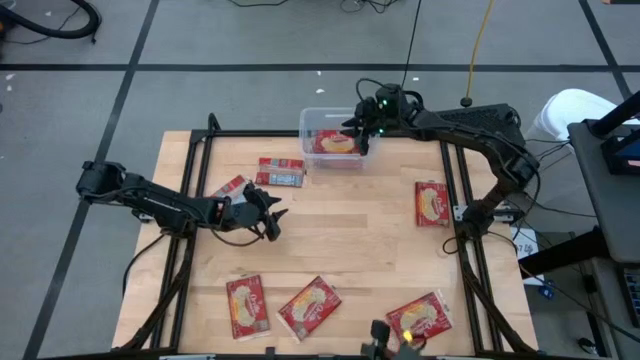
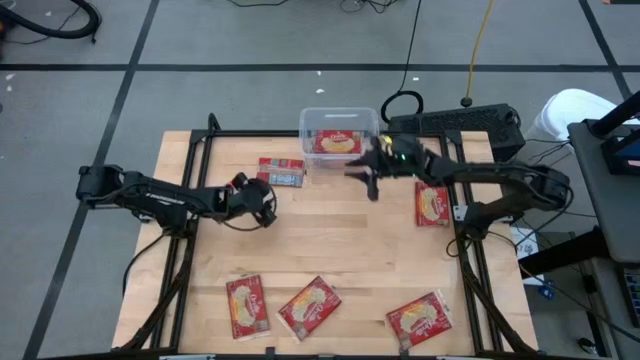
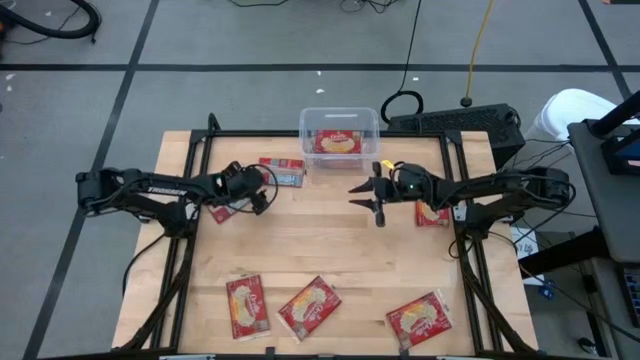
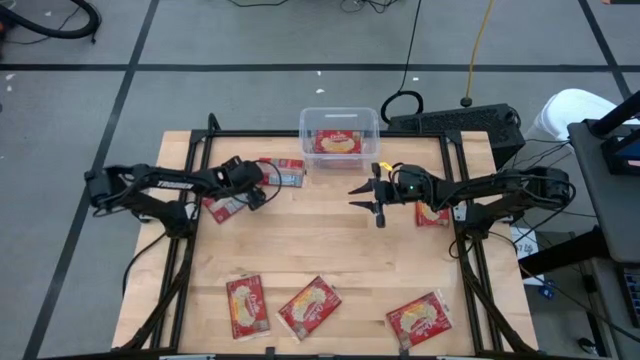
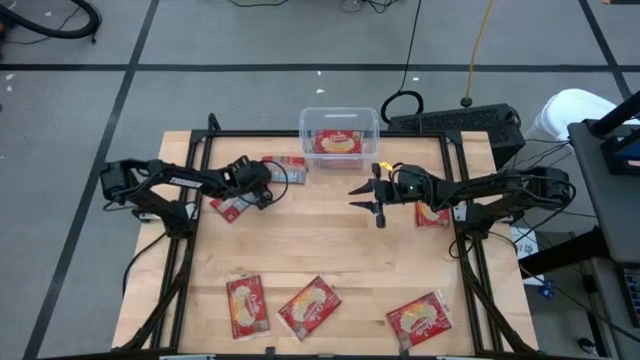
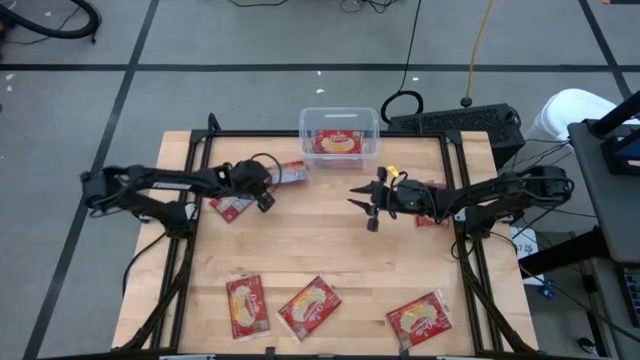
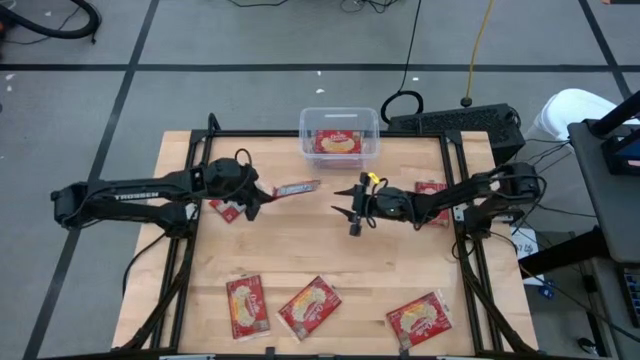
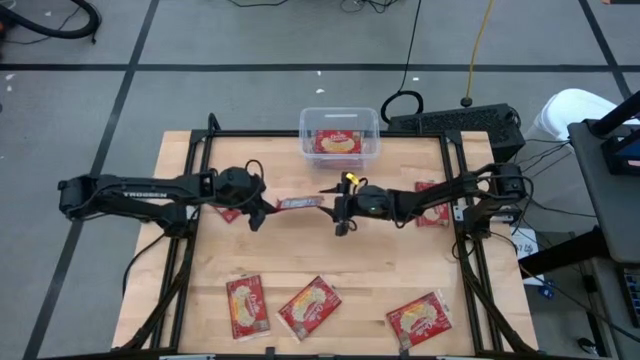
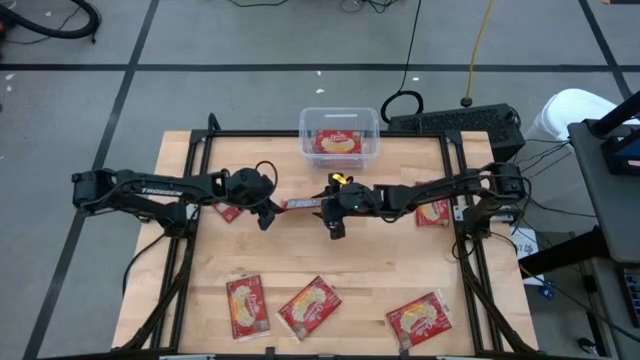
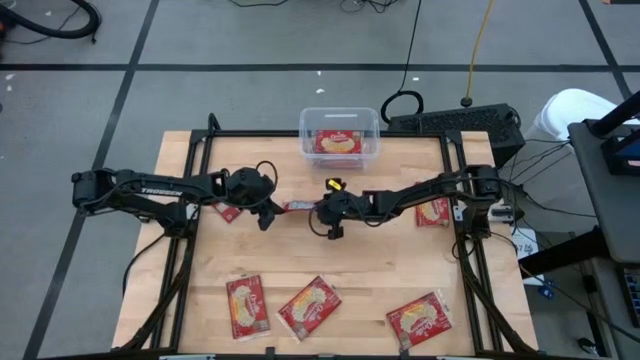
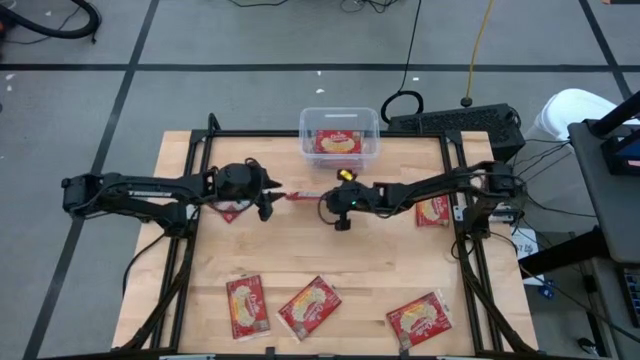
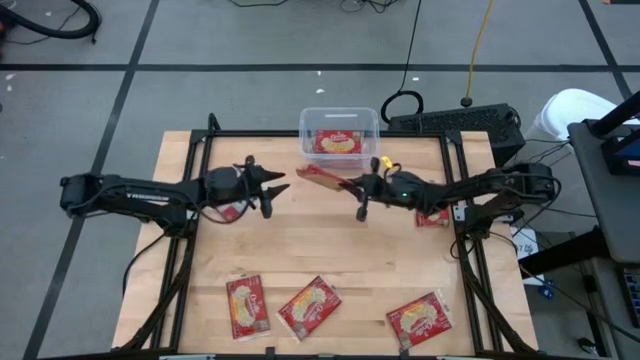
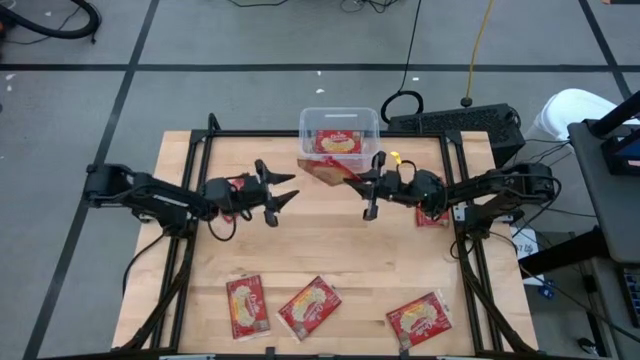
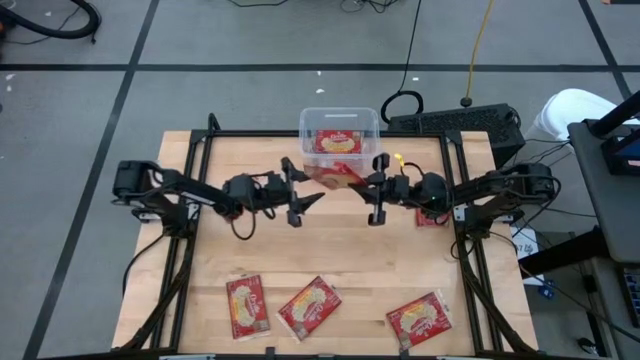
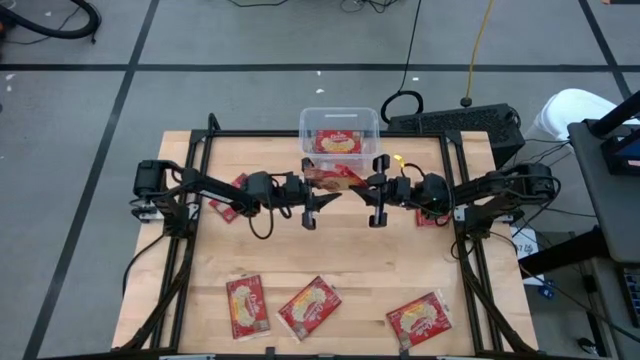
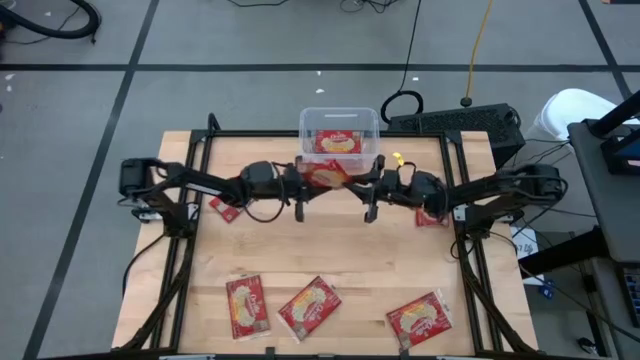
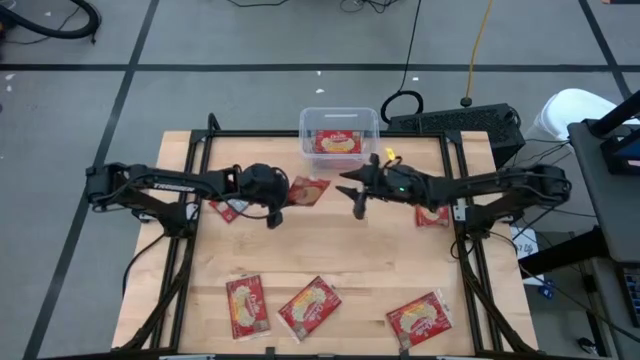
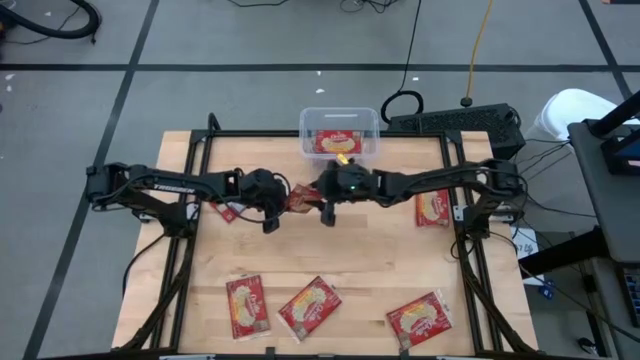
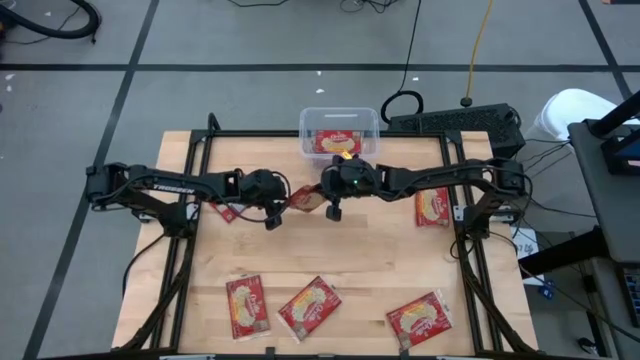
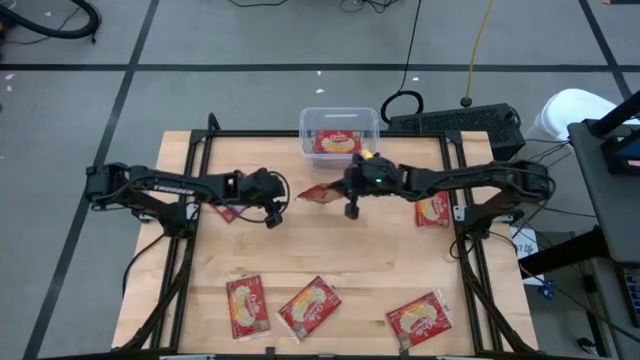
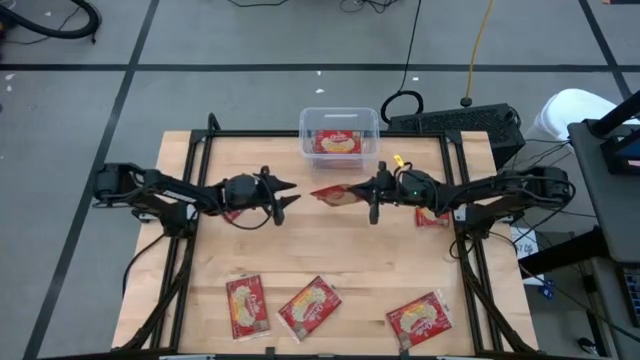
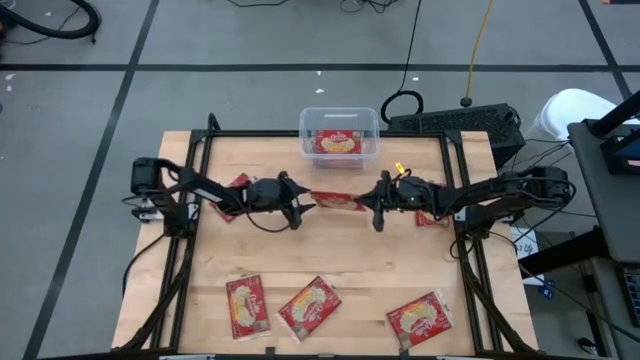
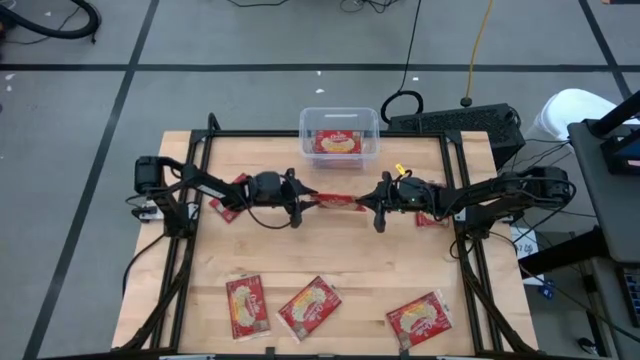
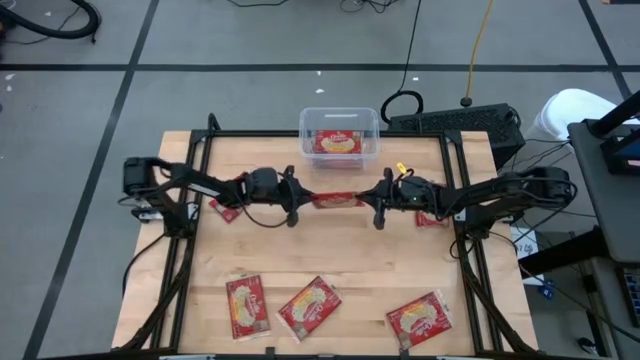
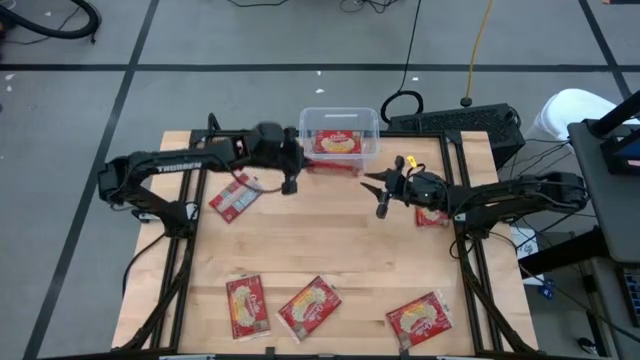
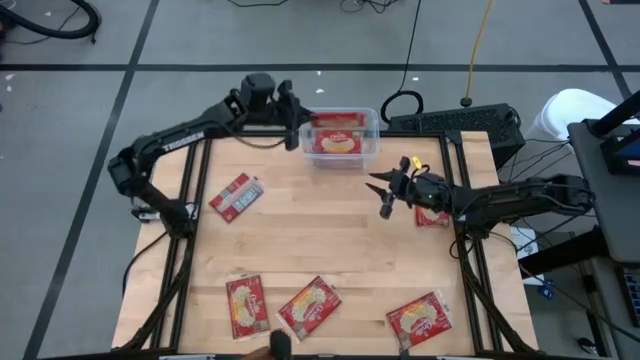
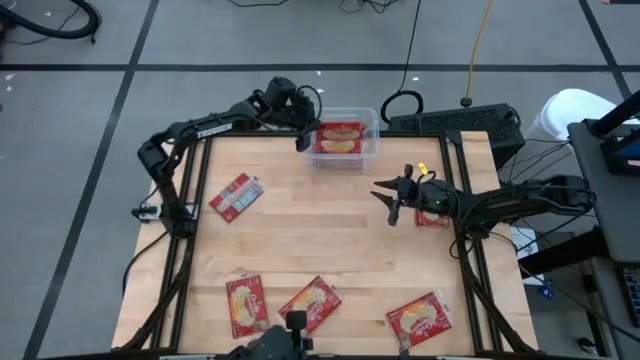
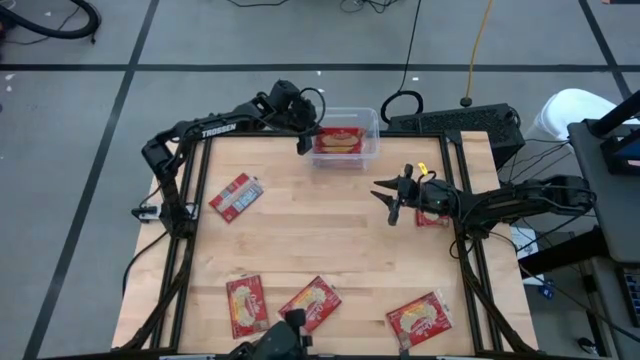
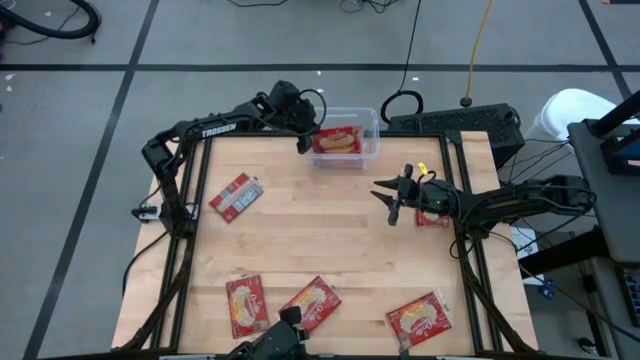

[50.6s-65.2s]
Task: Sort popcorn bags into baskets
Put the popcorn bags into the transparent bin

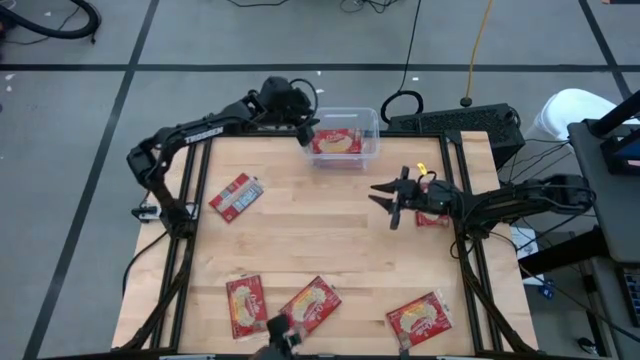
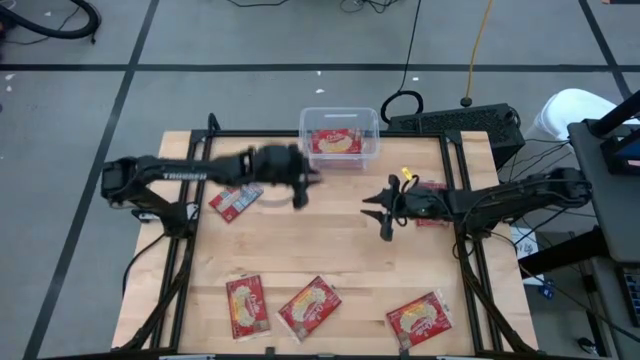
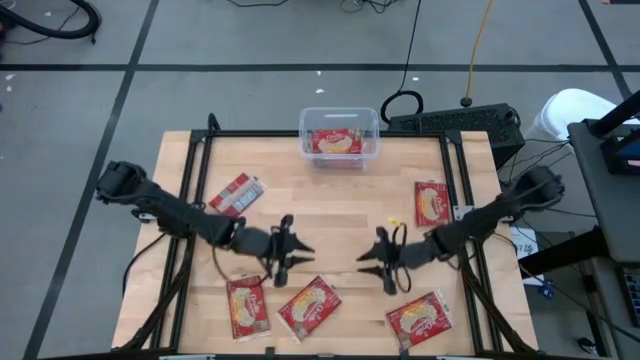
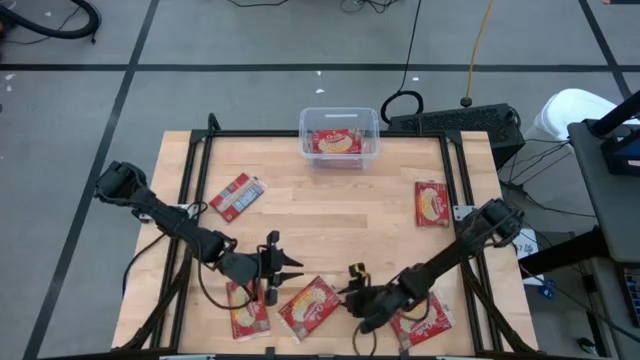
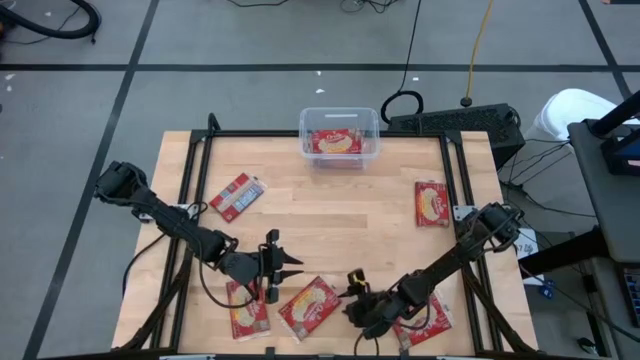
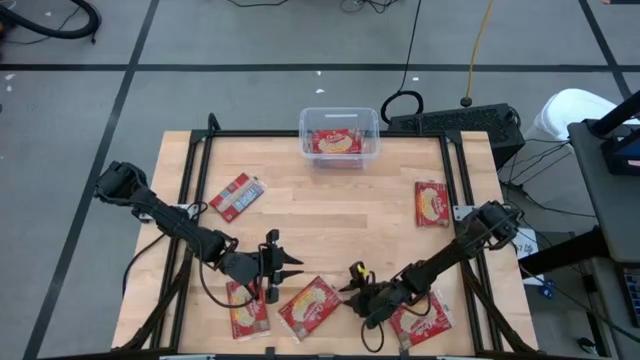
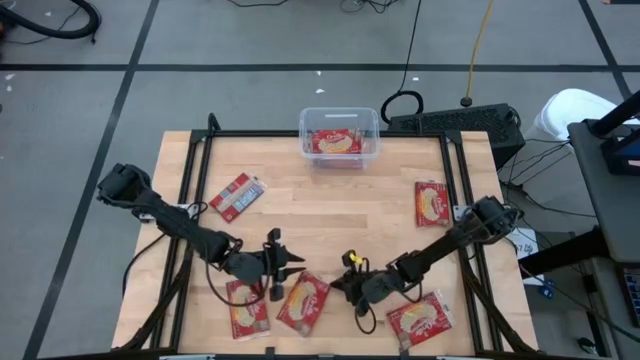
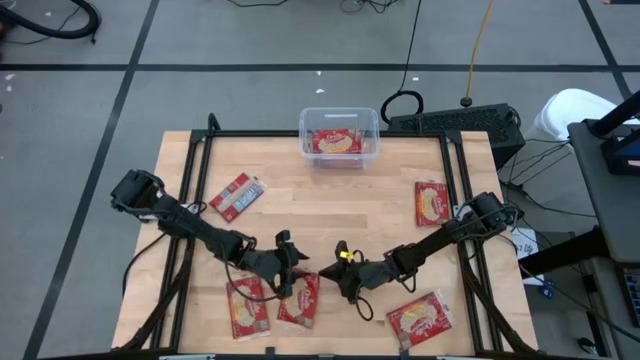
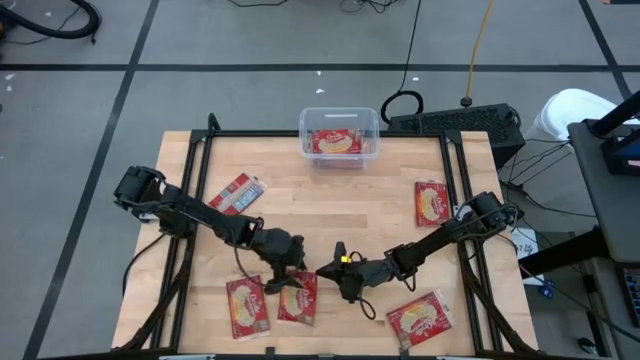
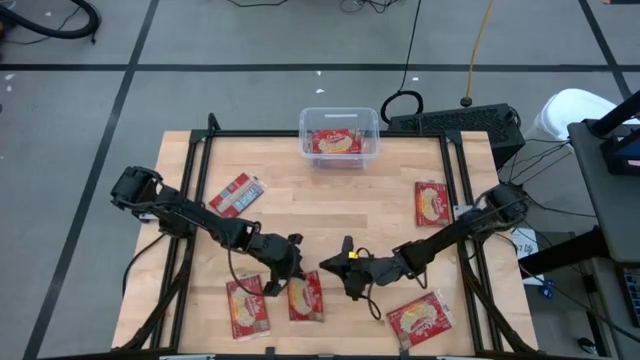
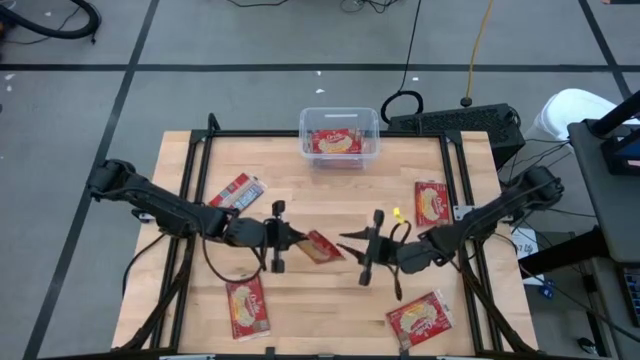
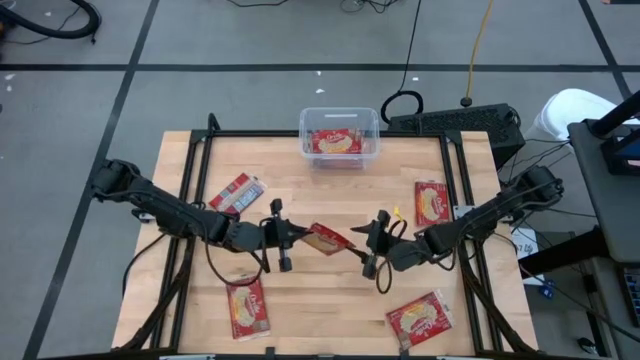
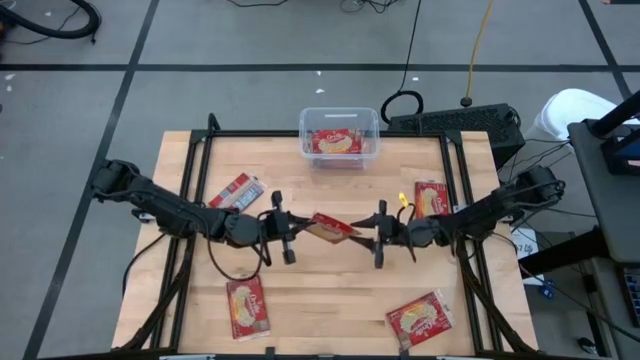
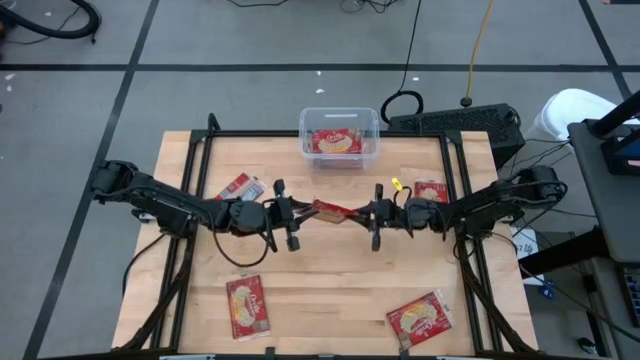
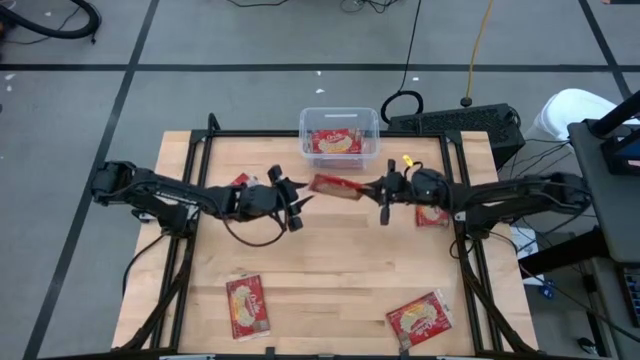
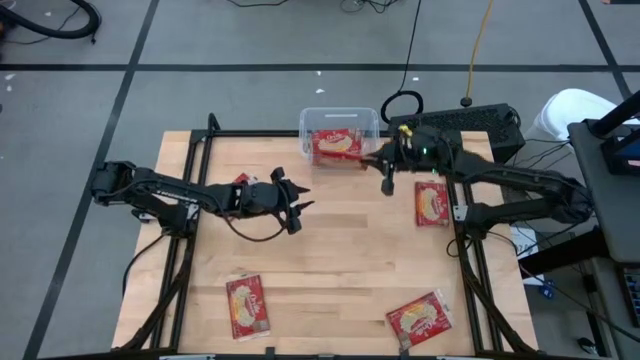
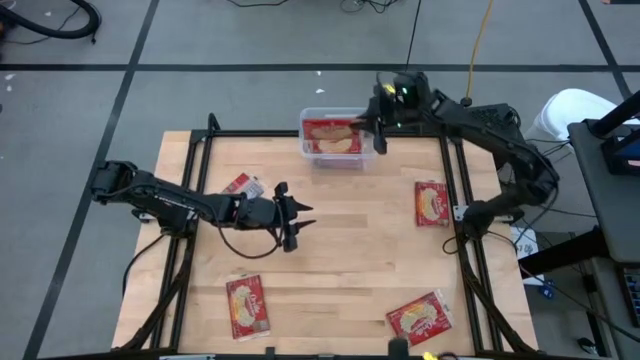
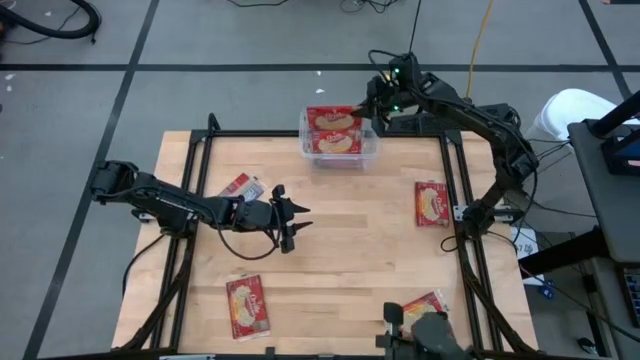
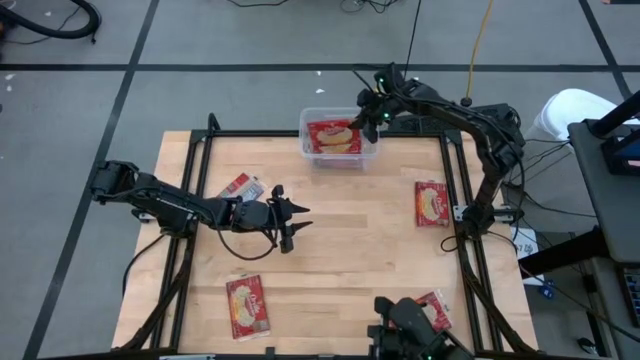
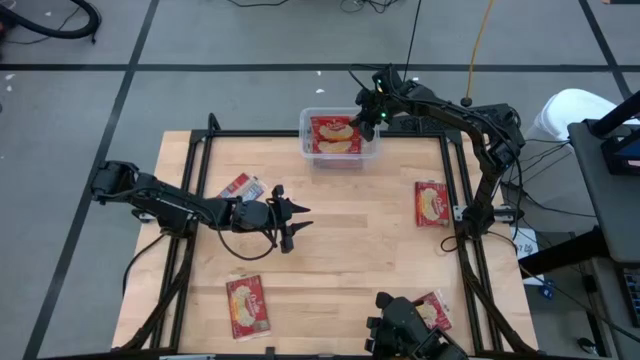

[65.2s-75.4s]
Put the popcorn bags into the transparent bin
